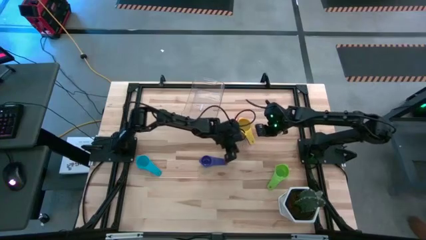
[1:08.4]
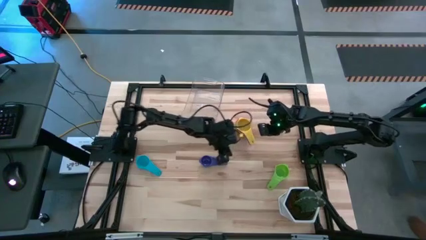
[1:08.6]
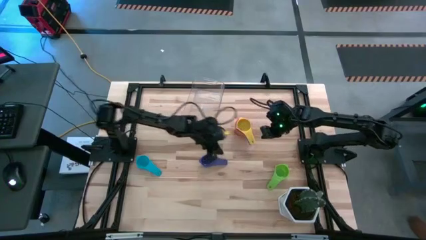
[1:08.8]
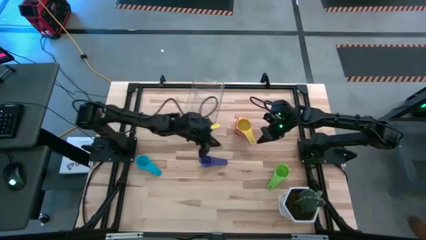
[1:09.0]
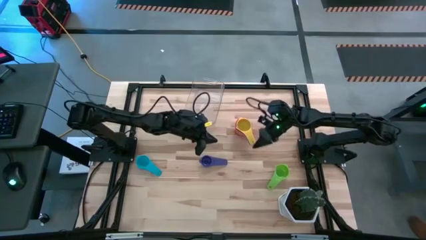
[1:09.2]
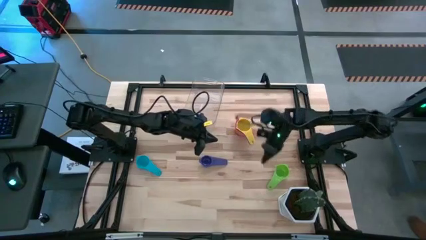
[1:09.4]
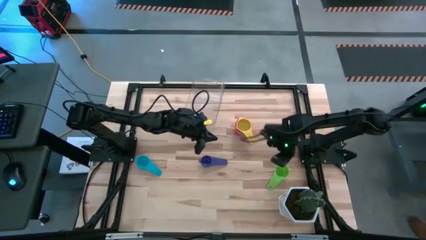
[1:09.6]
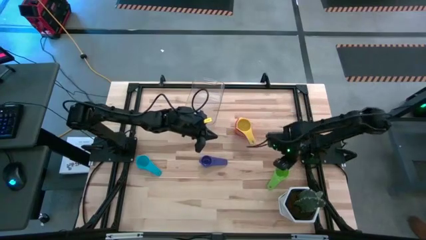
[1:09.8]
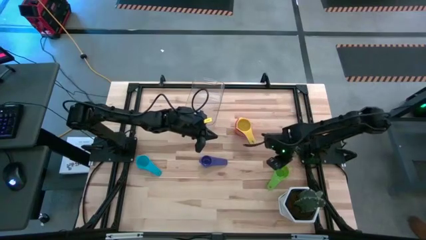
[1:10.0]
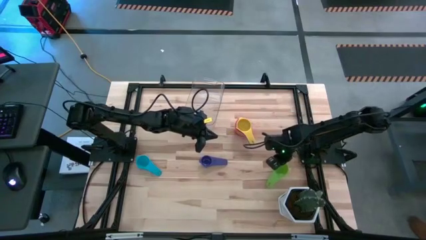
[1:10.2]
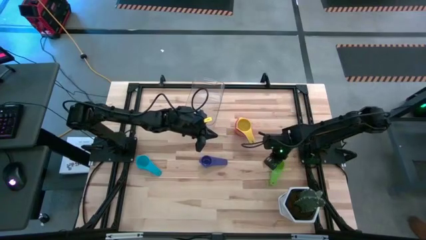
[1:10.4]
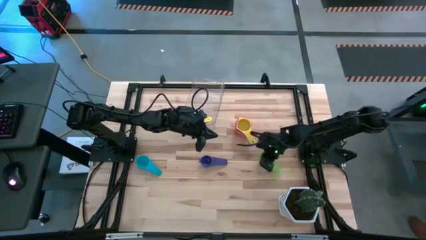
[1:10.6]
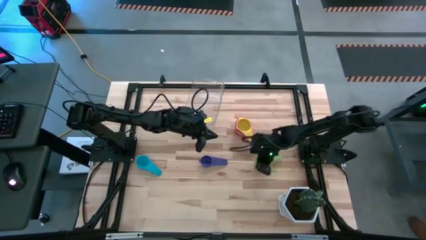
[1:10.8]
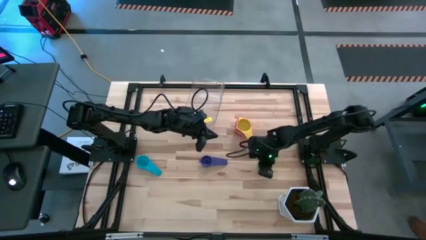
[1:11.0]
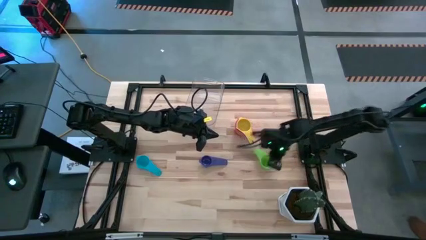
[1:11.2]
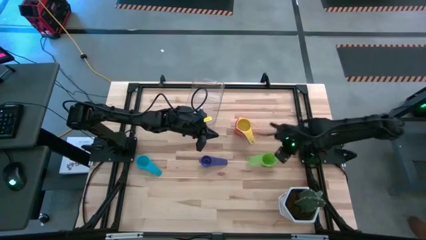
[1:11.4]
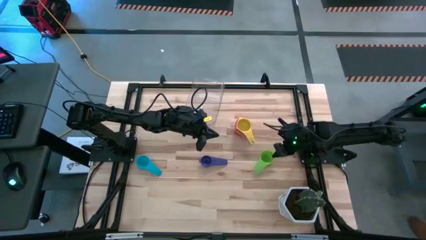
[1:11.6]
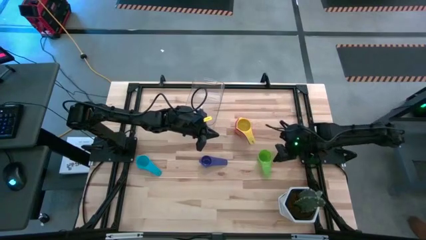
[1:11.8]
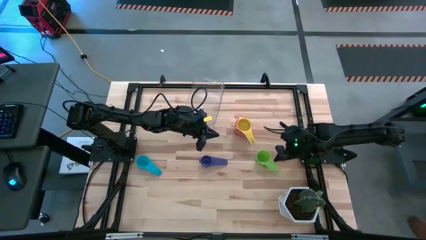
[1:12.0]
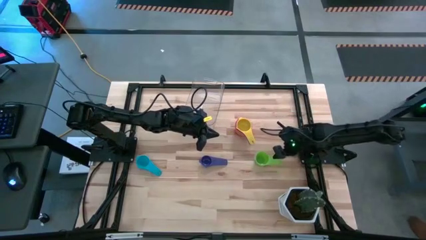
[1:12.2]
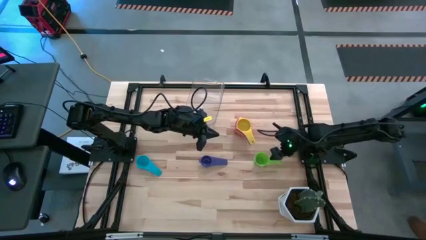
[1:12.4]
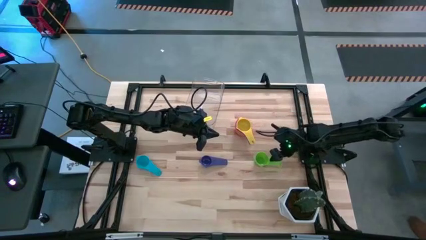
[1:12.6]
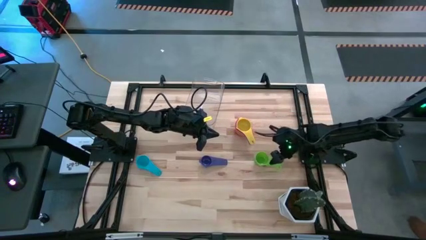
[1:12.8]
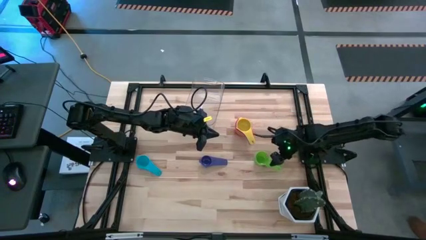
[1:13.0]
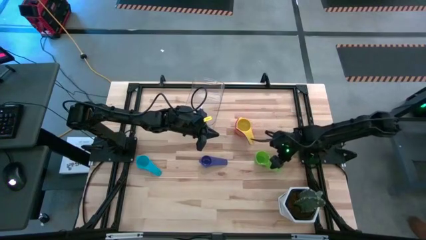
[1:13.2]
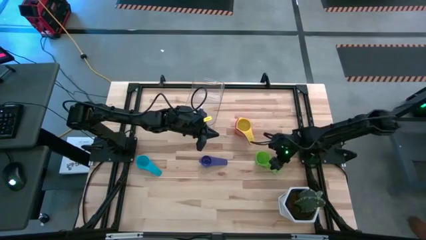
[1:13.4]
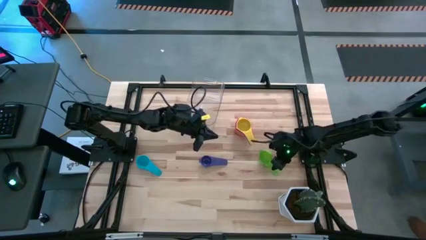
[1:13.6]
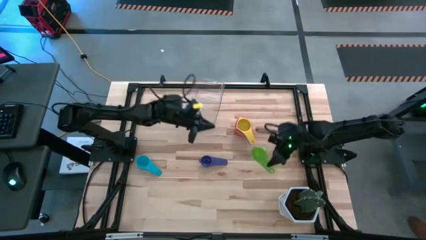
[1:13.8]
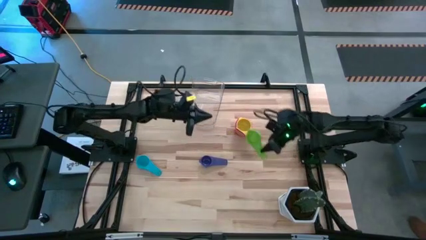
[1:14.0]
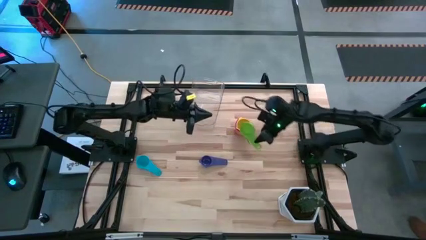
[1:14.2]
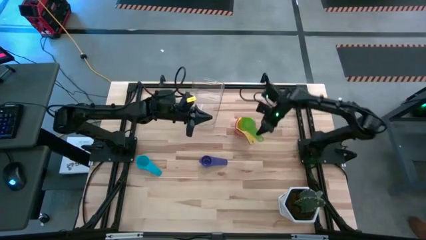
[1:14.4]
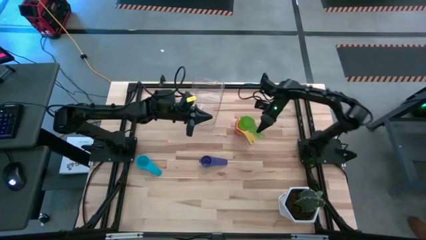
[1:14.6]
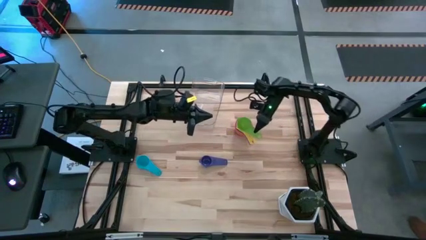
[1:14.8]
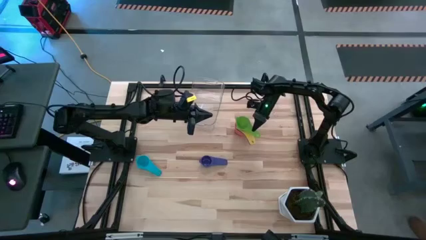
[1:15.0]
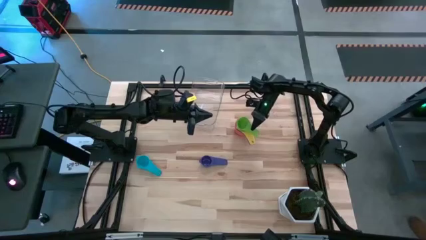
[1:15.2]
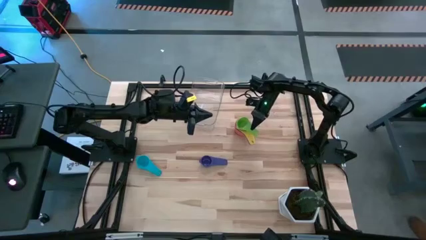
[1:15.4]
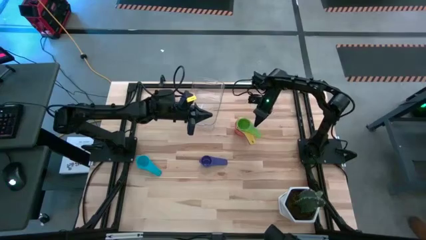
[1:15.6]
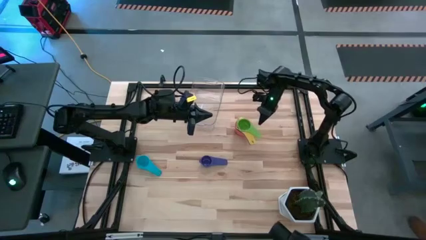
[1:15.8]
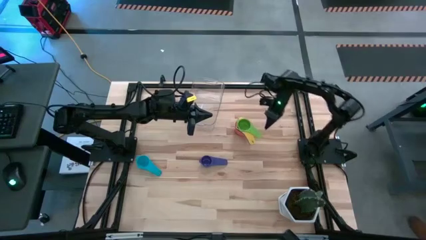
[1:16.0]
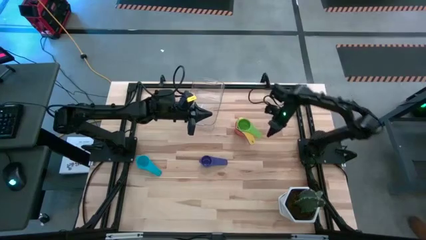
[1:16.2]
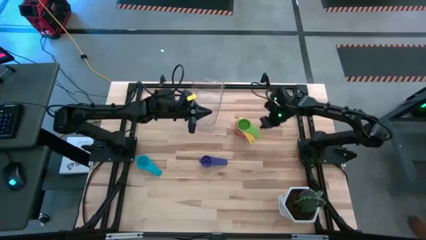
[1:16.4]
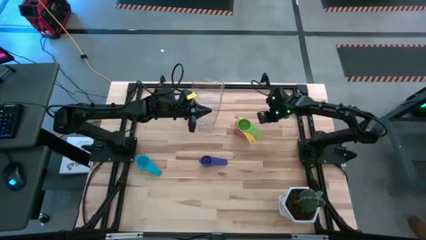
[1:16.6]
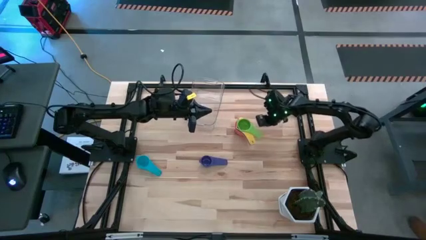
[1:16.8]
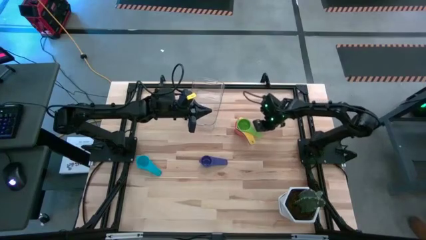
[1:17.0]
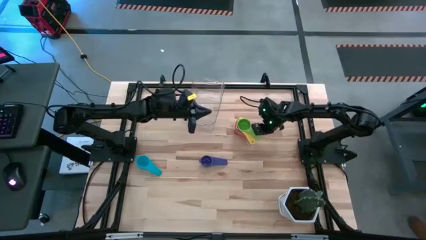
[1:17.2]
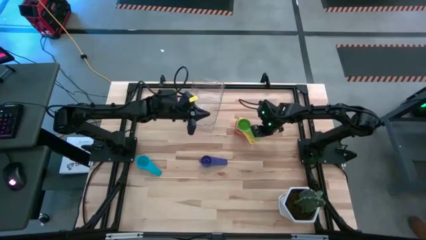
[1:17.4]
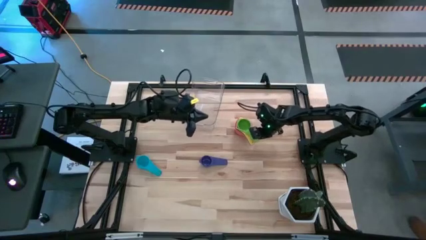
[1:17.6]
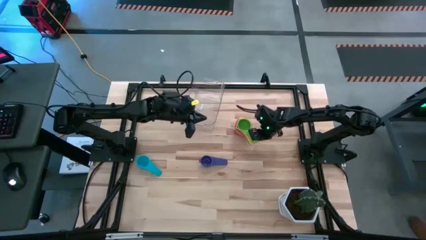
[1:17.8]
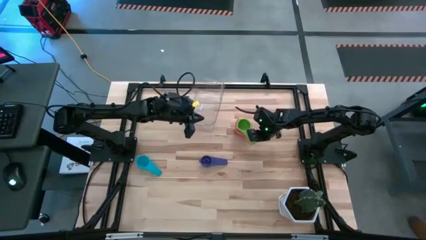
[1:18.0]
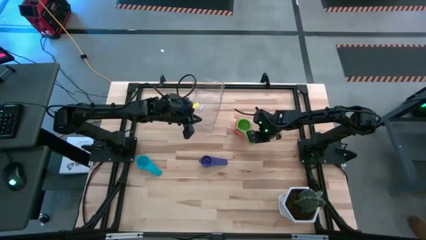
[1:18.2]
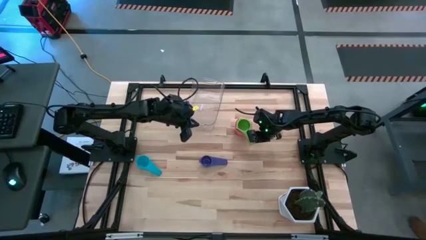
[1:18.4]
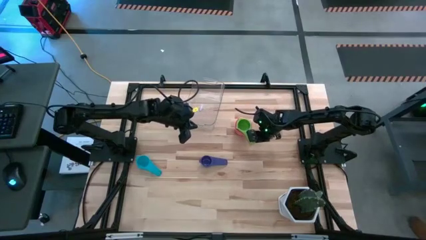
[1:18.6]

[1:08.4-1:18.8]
Task: Nest measuring cups in basket
Stack the green measuring cup on top of the yellow measuring cup

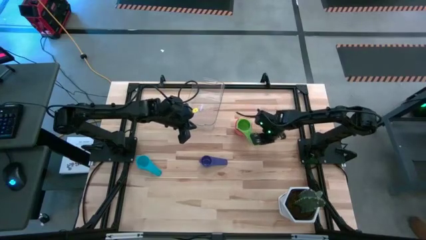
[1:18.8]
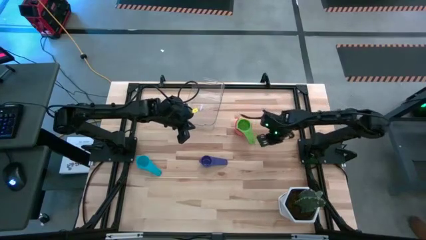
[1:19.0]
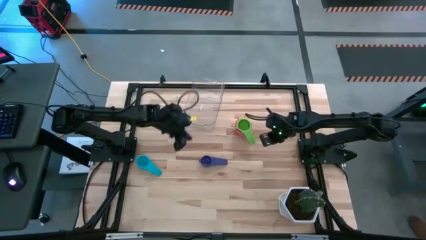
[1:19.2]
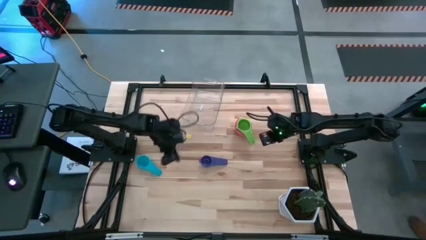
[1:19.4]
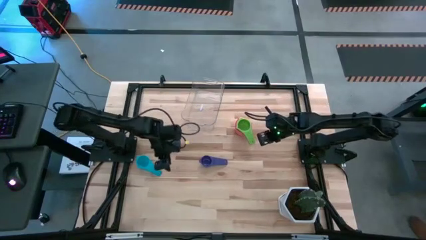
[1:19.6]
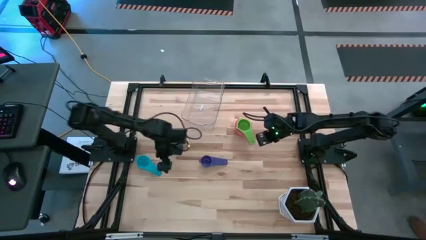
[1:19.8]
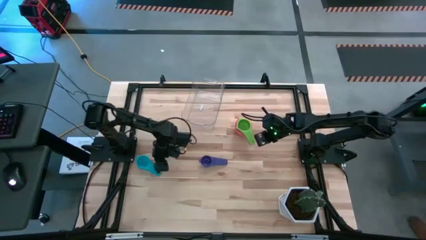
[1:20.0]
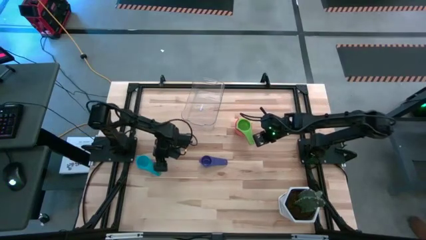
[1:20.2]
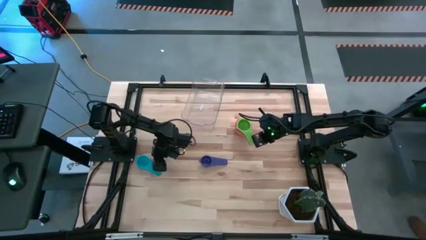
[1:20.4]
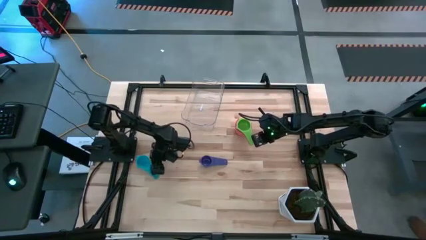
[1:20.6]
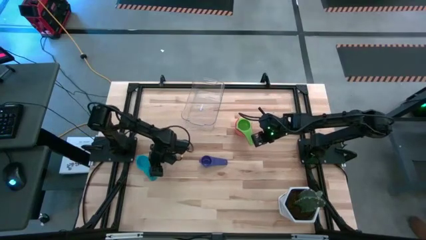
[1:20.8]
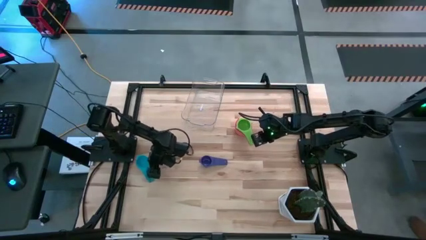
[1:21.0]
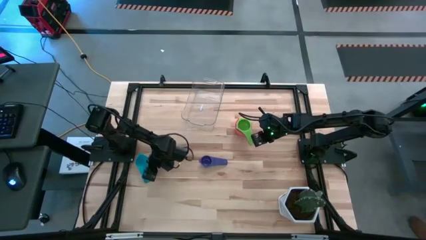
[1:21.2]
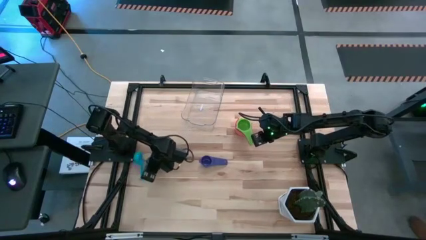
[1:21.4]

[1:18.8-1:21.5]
Put the light blue measuring cup on top of the green measuring cup
